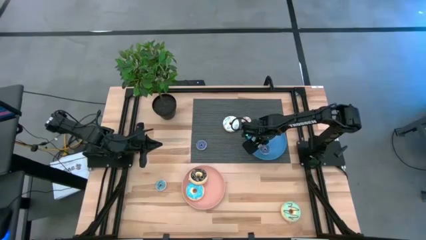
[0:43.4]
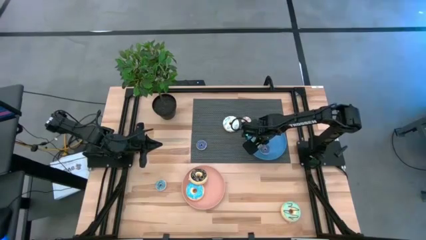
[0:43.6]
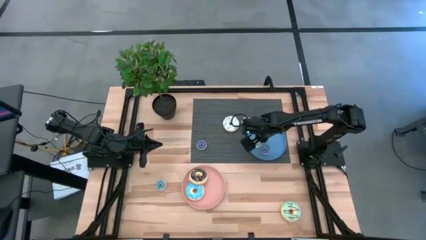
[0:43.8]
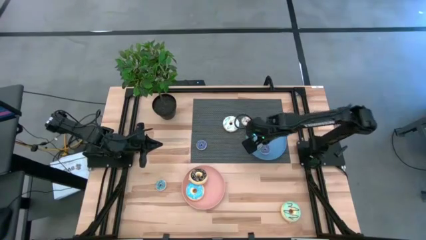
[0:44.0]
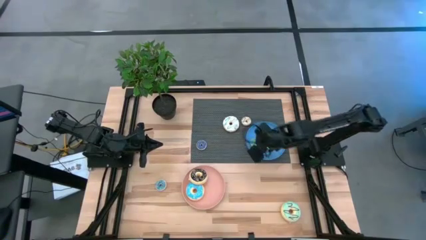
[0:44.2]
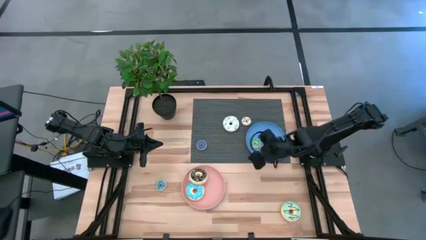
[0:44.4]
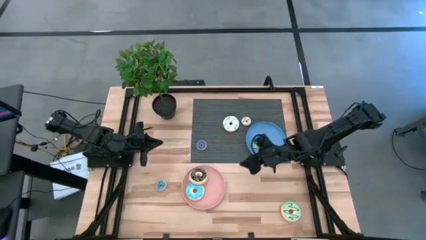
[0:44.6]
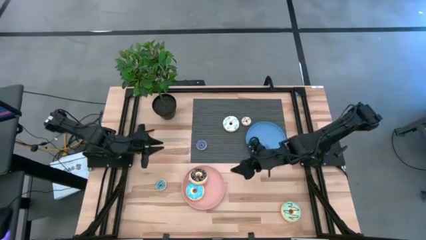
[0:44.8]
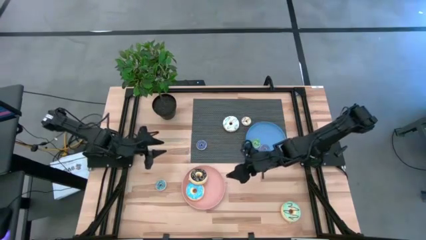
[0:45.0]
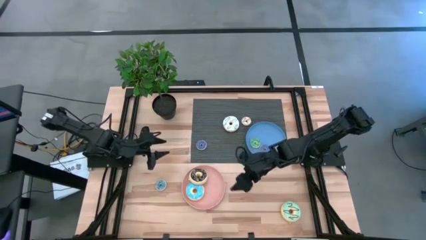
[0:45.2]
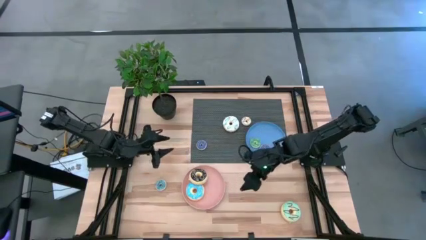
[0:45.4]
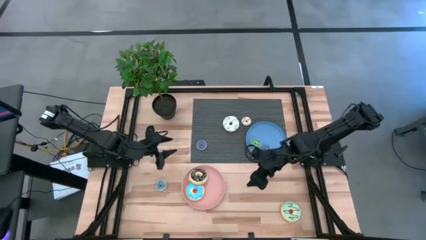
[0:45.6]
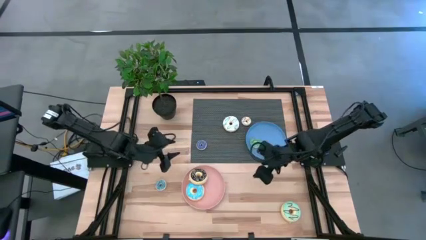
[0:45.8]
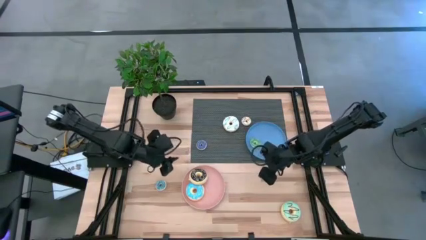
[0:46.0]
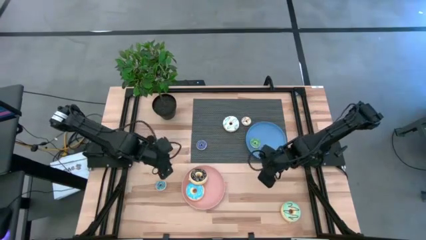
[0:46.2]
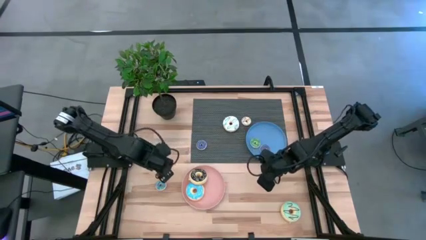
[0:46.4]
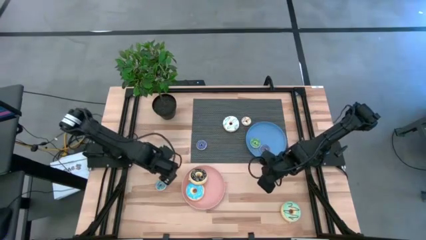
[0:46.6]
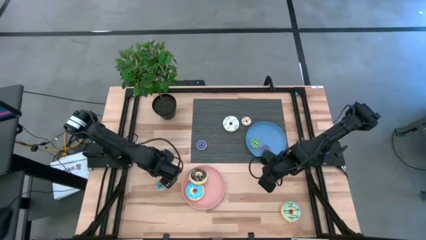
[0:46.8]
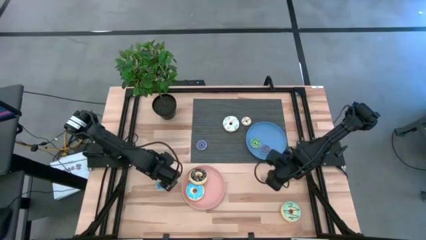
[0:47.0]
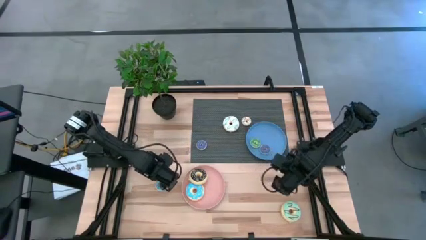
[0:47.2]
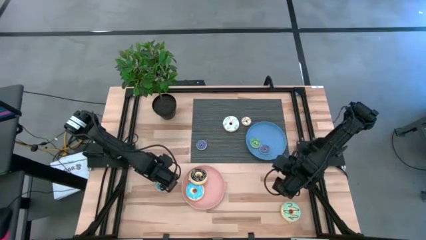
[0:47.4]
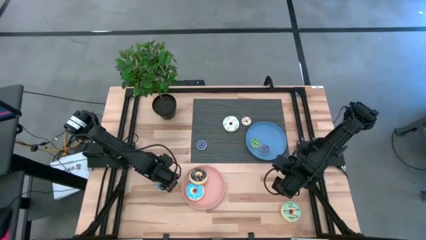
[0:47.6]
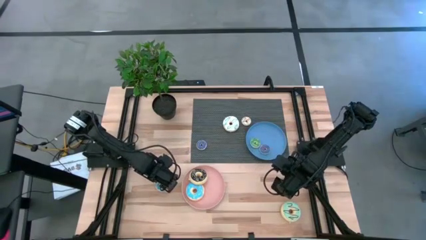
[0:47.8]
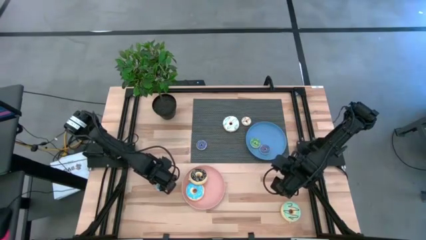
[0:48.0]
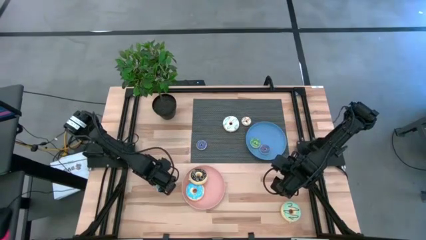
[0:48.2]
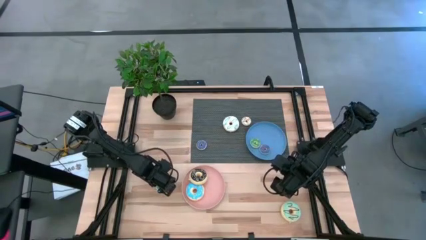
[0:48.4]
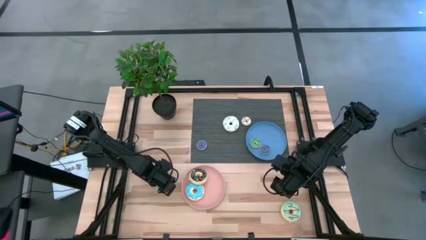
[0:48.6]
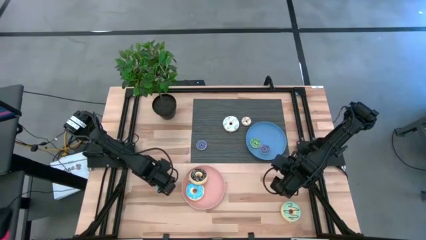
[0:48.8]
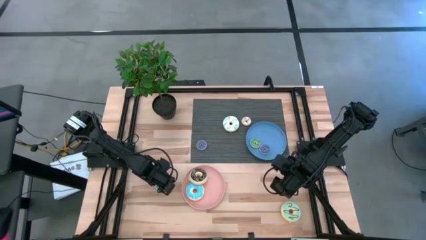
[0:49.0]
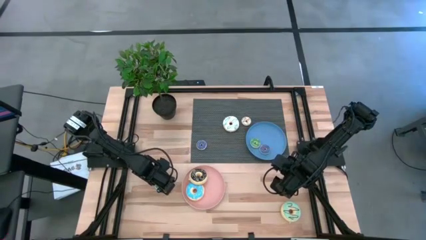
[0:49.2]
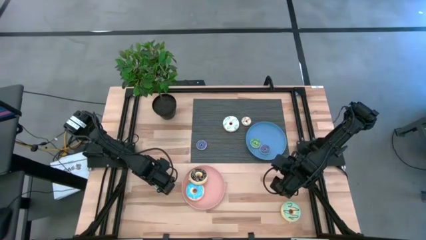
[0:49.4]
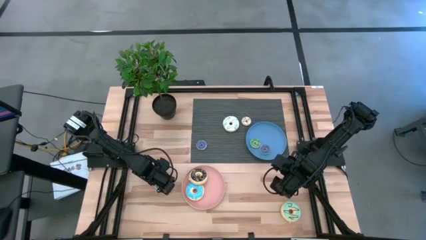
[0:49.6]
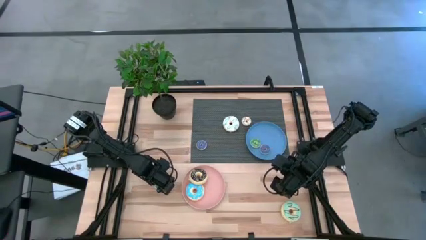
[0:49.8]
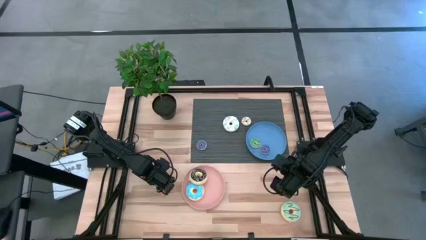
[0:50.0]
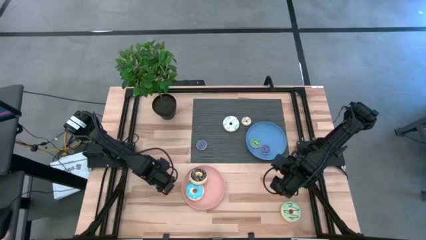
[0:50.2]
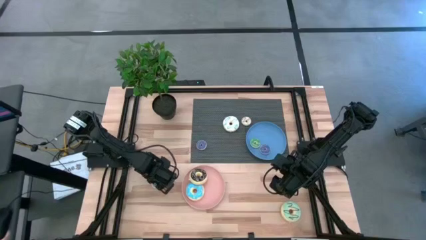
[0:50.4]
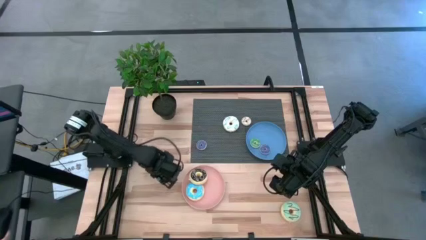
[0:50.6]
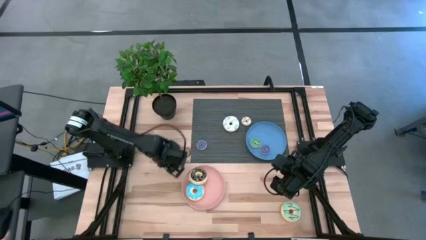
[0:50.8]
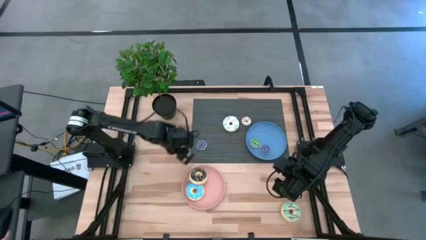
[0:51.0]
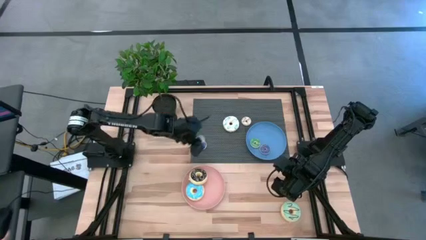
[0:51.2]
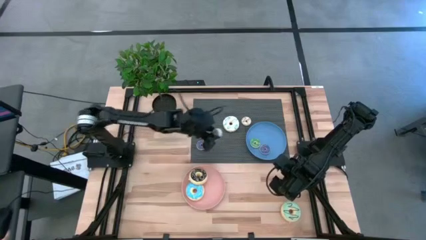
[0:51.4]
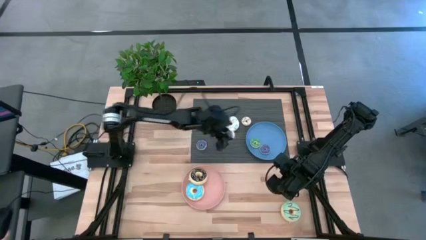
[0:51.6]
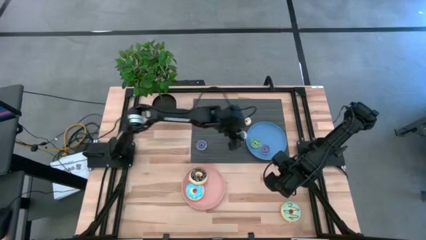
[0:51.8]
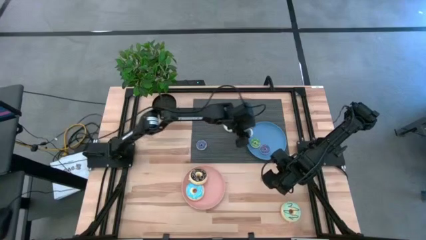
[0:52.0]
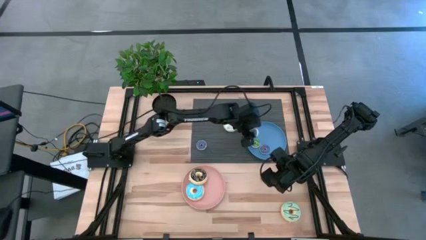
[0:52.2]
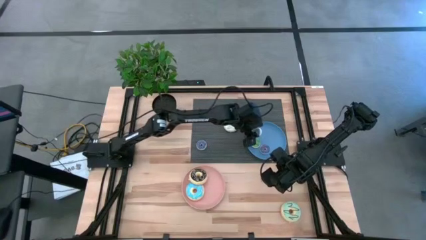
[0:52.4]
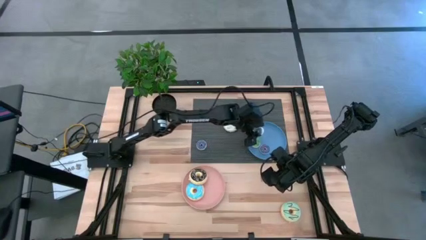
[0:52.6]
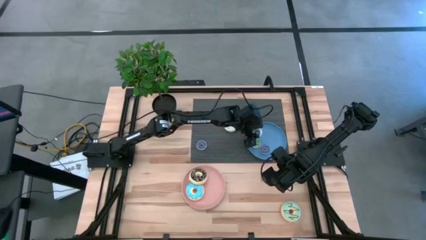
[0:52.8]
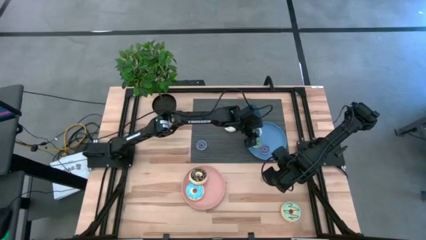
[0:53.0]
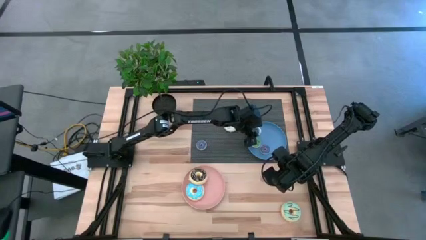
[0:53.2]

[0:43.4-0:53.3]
Task: Pick & Place donuts
Put the small blue donut onto the blue plate
